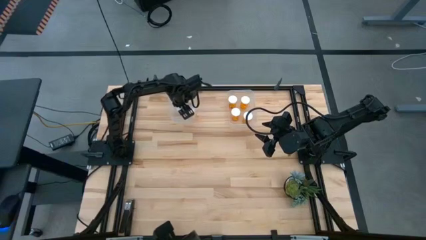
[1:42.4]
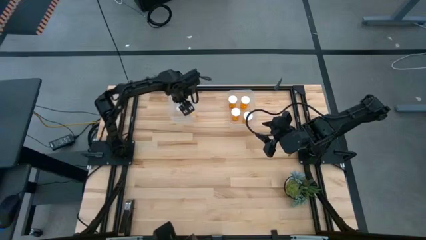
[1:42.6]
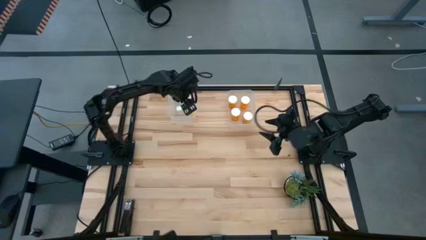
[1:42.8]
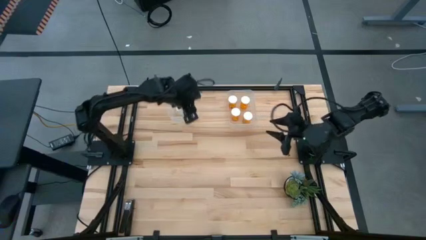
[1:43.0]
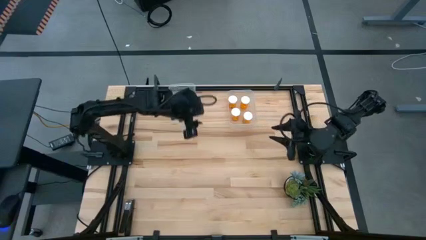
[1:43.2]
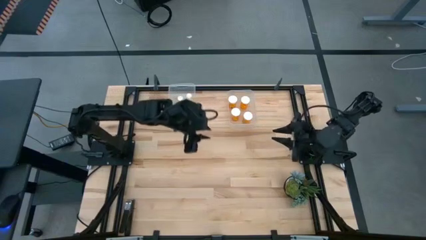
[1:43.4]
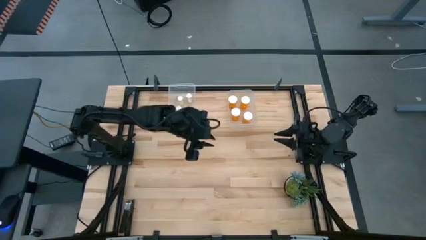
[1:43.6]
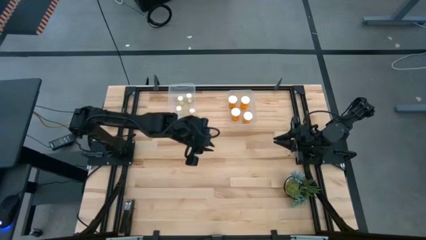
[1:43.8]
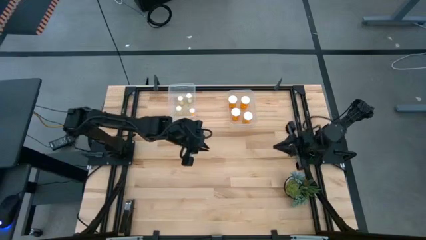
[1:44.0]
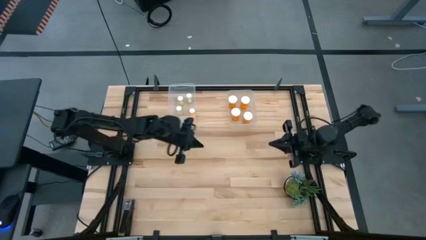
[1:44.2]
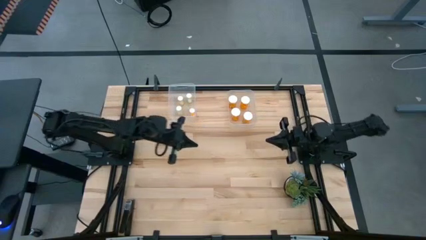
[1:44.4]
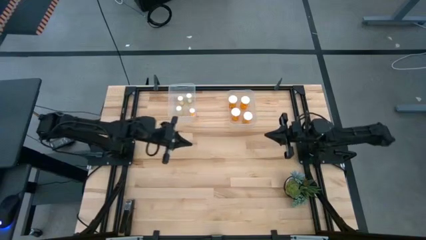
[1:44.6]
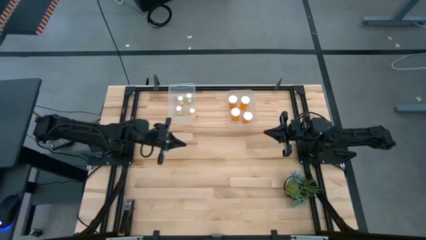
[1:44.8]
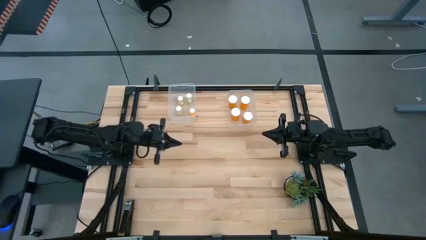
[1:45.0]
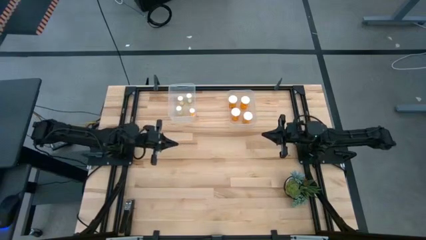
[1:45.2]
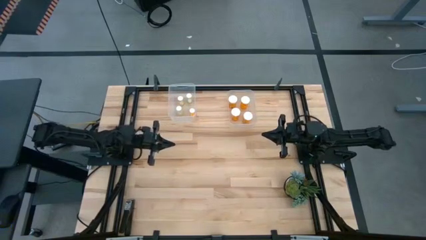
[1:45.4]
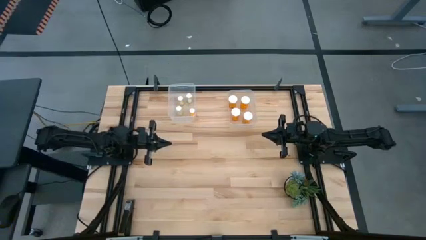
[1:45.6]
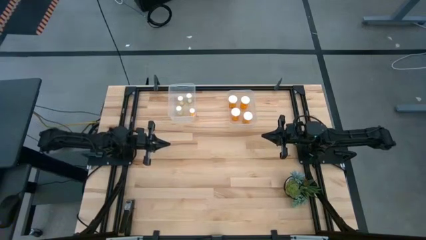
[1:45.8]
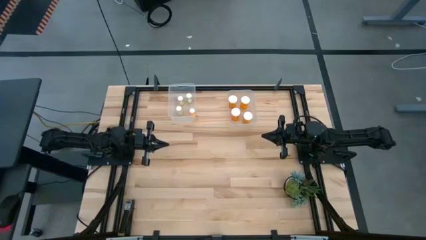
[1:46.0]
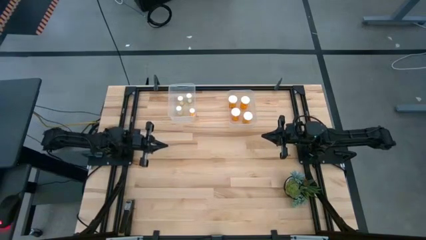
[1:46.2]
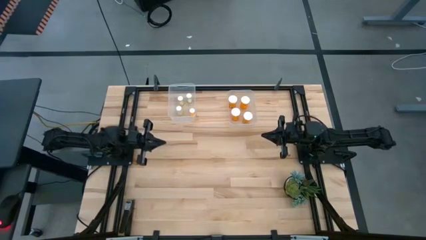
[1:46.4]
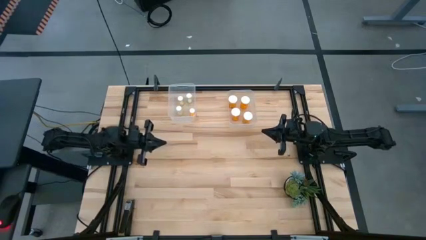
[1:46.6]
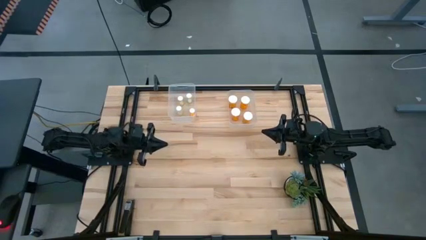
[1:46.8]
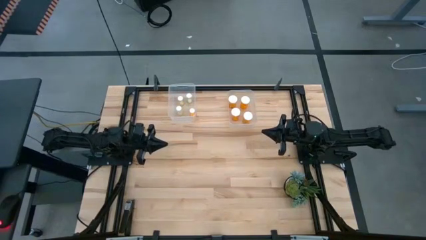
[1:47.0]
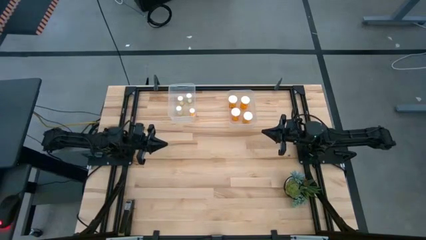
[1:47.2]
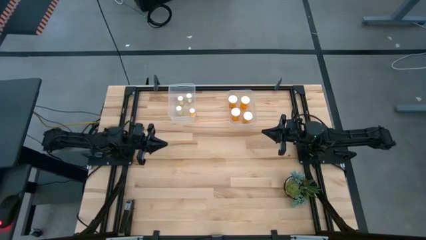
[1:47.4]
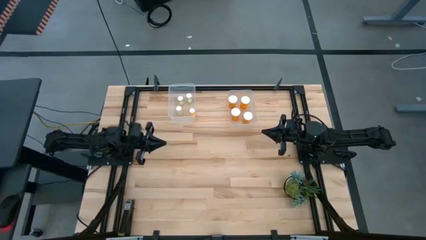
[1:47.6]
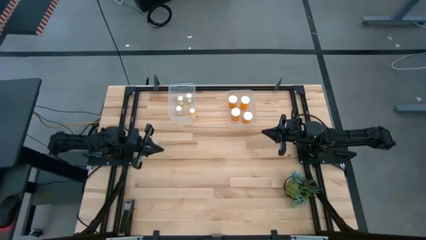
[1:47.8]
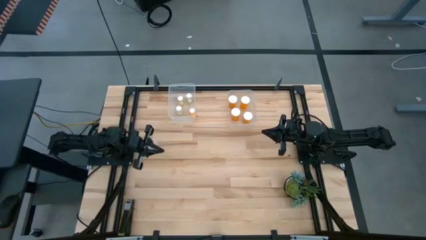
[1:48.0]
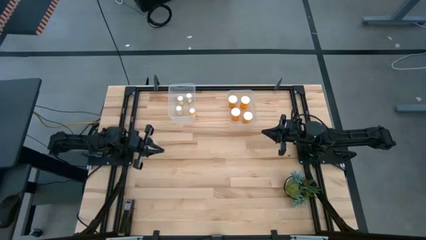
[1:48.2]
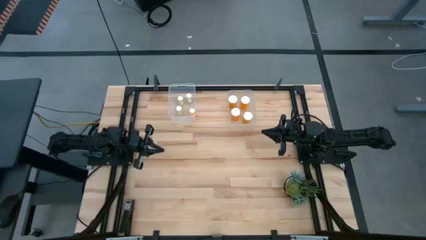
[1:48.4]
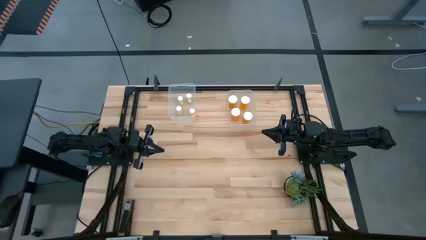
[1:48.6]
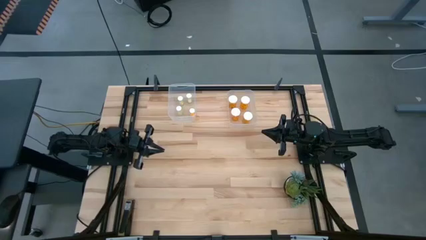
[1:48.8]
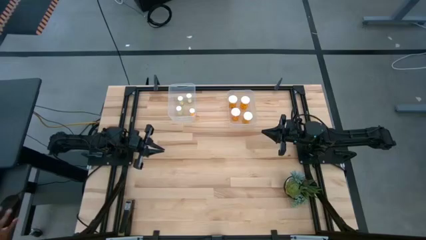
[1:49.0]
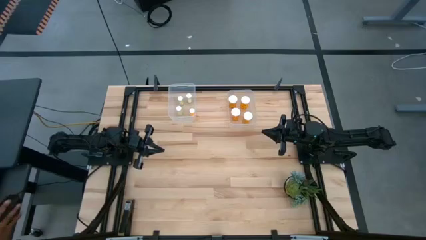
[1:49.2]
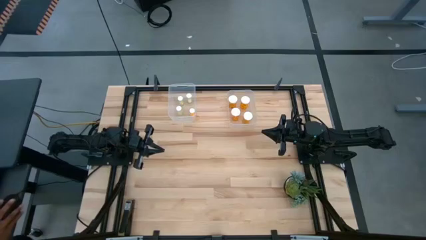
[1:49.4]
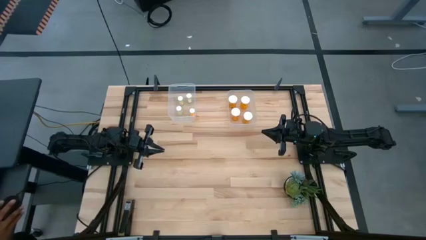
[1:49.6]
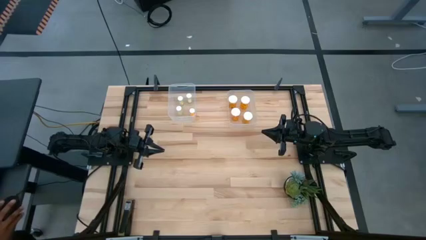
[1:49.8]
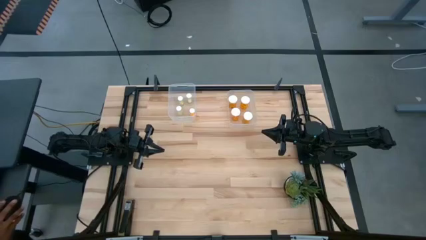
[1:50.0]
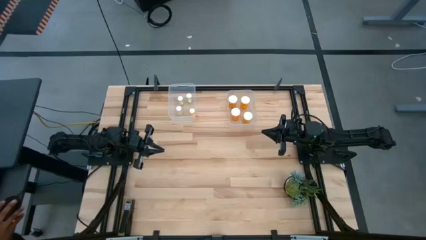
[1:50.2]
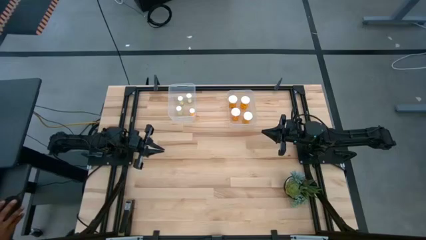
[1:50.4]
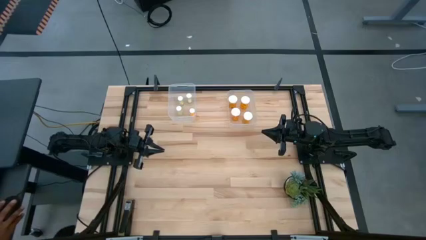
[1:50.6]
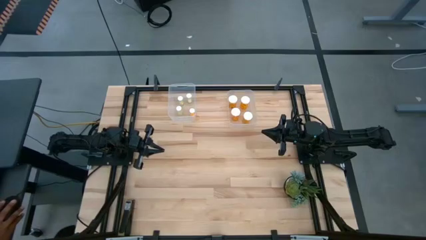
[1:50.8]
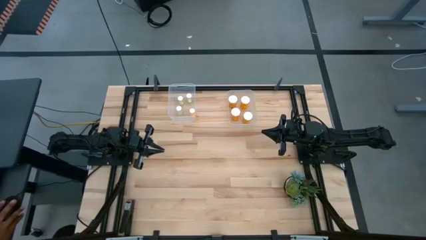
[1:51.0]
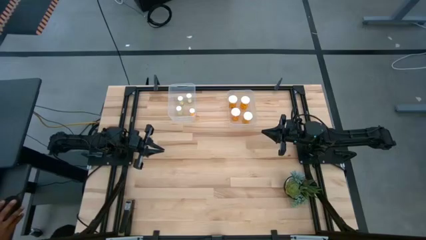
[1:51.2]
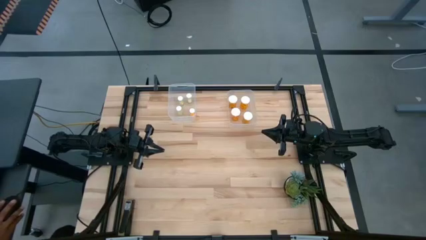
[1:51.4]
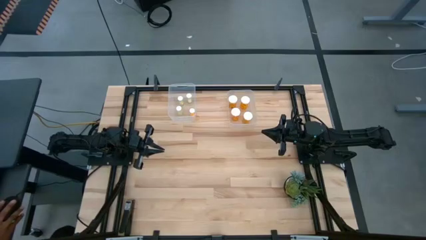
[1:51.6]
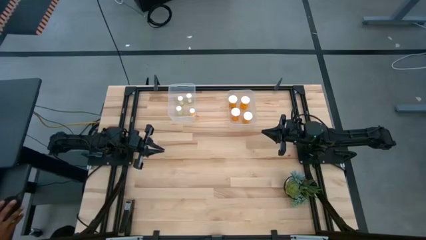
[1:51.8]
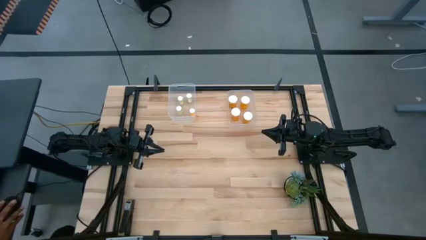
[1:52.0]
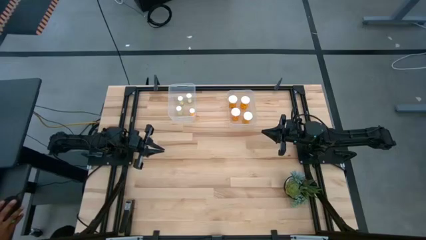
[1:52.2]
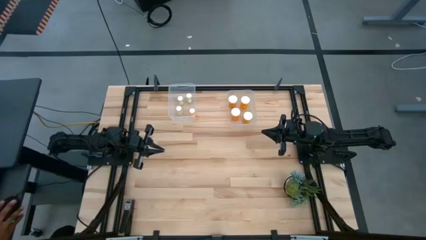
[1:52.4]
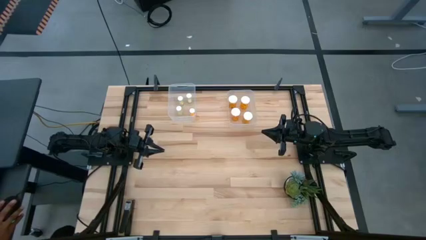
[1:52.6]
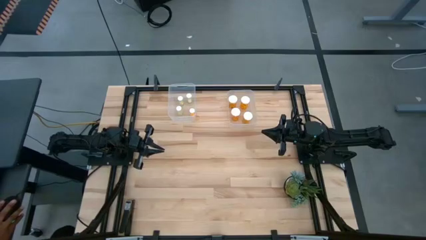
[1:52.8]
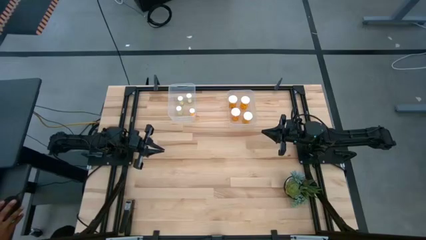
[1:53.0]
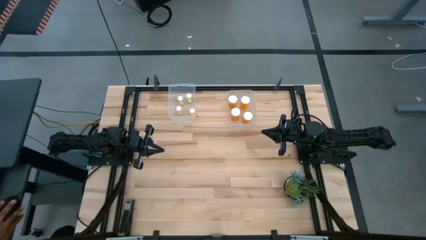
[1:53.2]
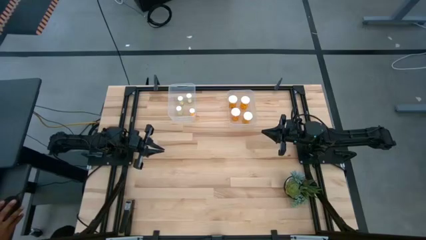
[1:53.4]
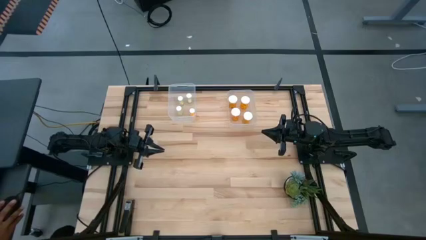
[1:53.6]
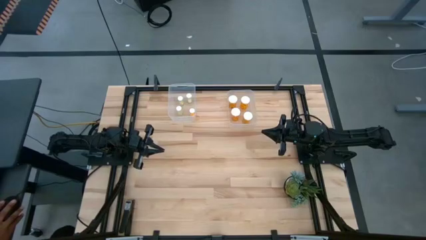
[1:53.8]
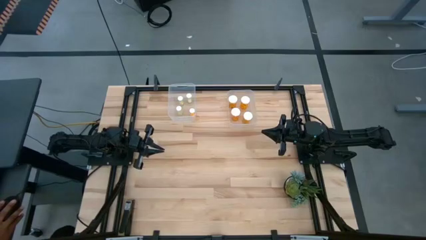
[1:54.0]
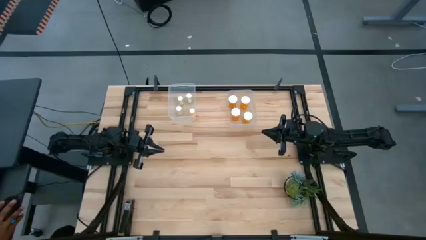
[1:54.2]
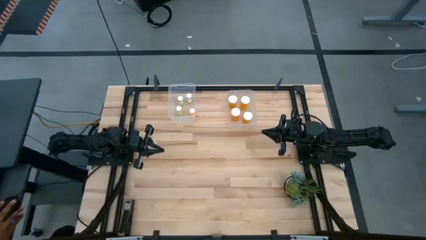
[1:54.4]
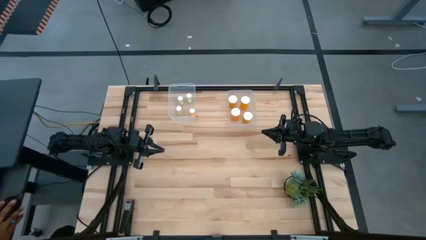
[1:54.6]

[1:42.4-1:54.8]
Task: Pick and place medicine bottles into bin by pill shape (circle, oval)
Return to Home Position

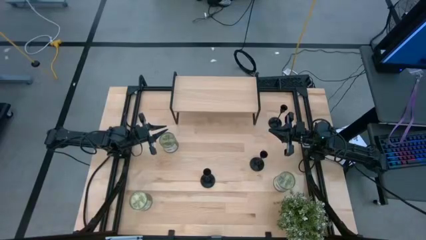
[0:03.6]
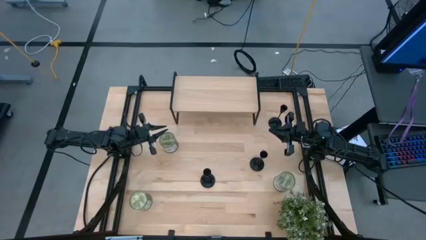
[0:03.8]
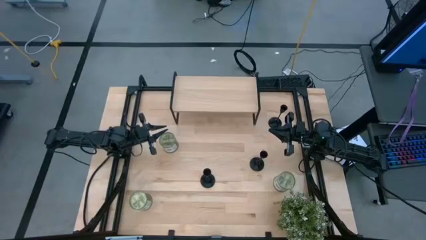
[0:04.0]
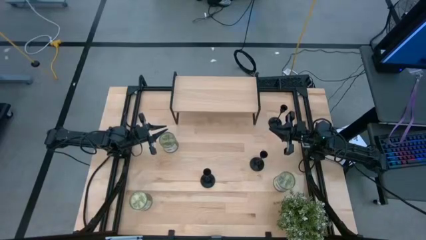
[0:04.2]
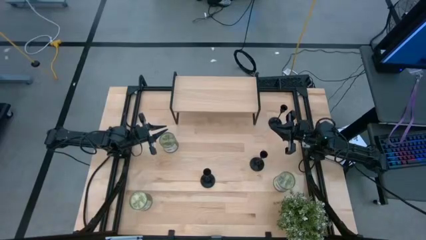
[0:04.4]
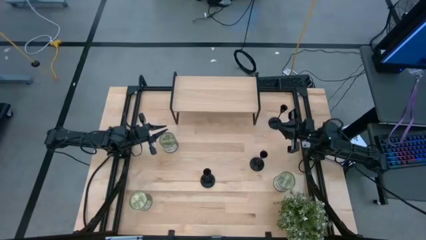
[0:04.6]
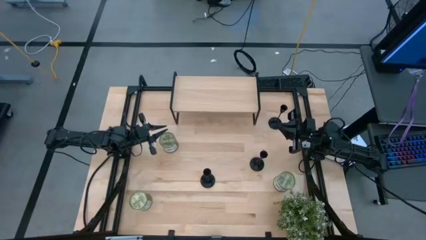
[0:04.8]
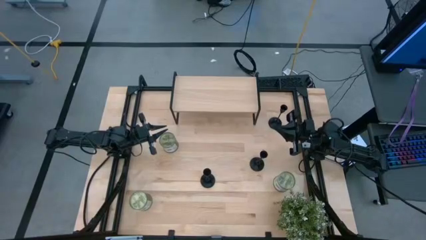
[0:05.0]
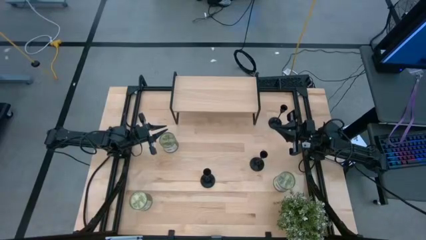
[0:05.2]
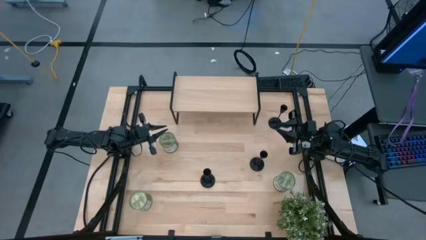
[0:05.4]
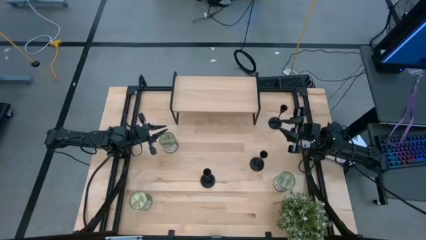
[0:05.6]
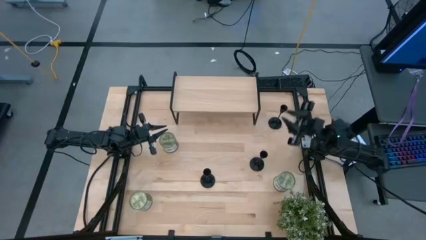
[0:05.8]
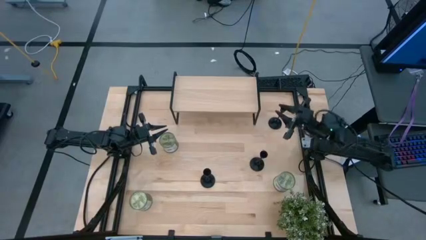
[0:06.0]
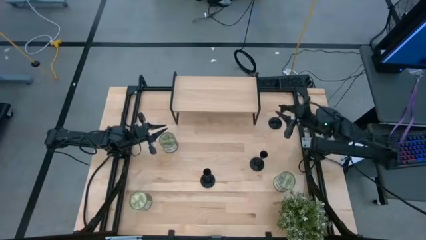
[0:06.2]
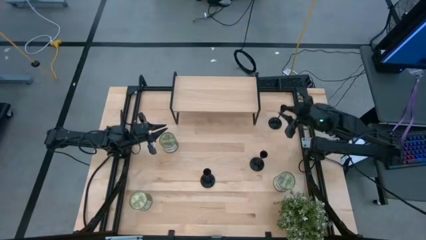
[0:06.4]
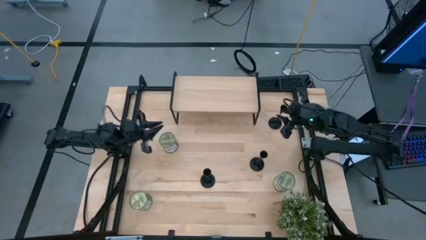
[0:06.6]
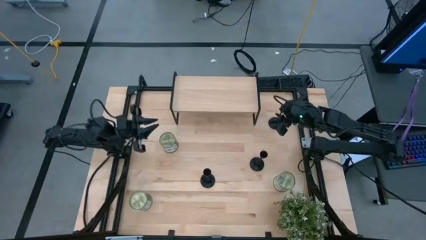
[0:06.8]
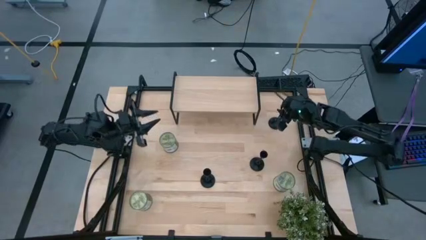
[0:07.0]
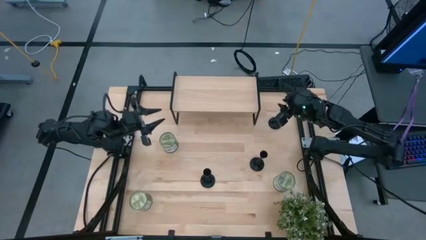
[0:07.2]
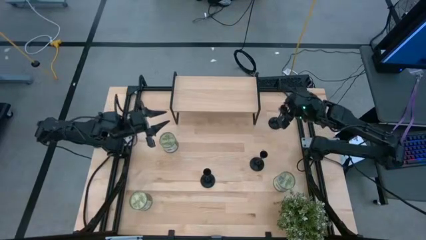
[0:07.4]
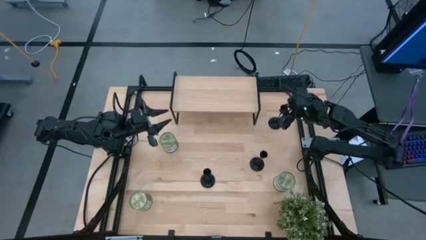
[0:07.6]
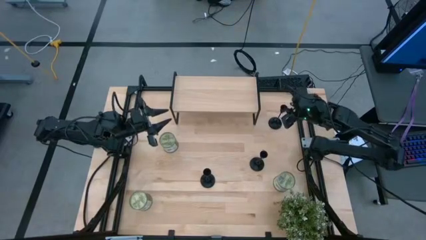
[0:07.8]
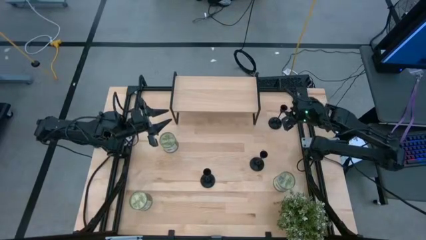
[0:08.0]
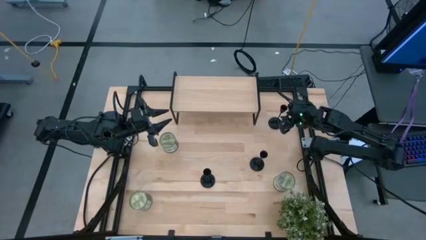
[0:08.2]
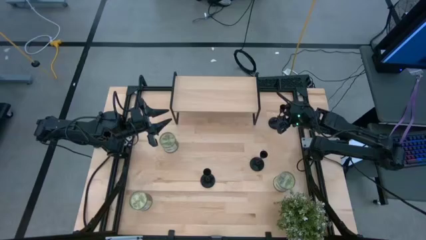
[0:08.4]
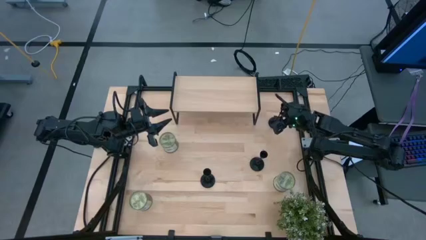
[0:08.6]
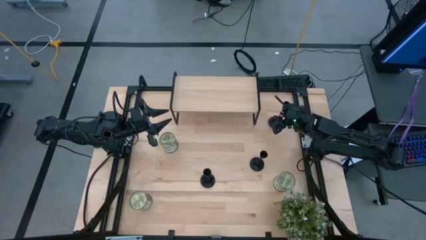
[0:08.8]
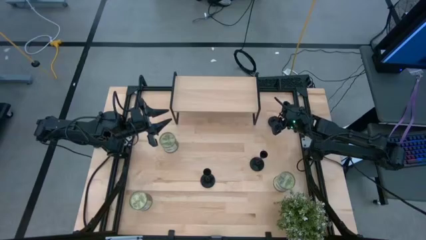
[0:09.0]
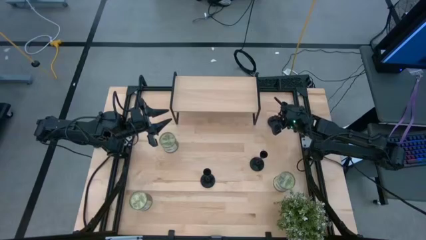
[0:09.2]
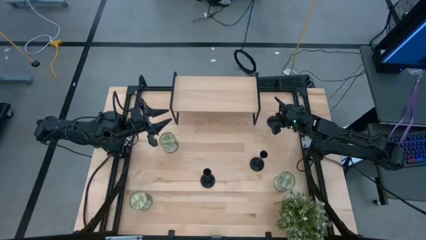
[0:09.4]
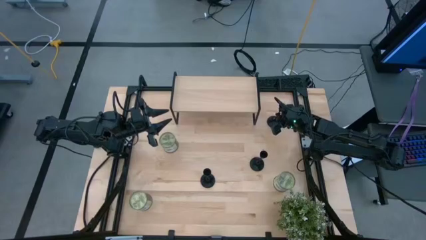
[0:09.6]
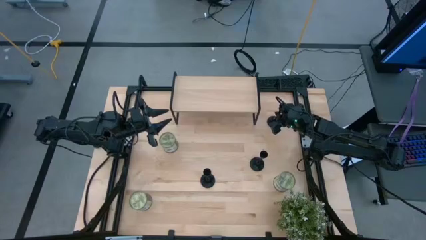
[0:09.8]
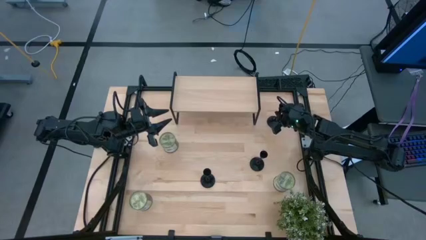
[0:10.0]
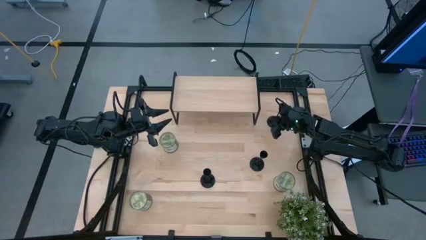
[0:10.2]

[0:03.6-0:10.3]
Task: Pick & Place candle stick holders
Put the top black candle holder on the shelf
